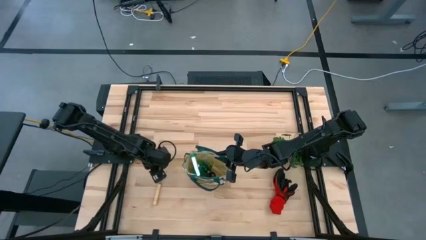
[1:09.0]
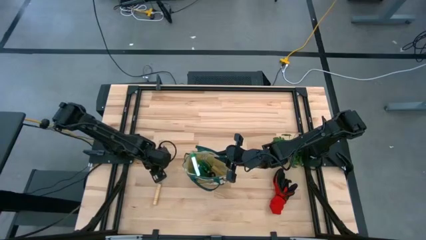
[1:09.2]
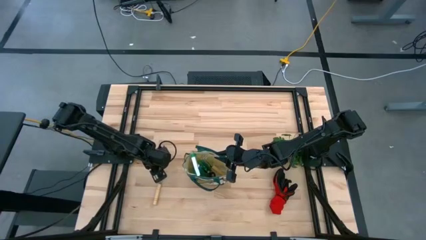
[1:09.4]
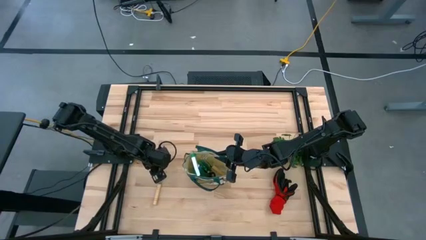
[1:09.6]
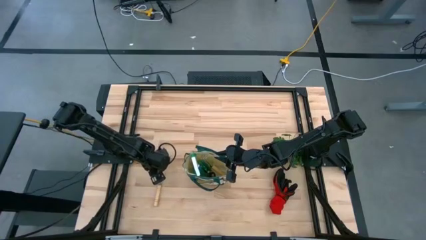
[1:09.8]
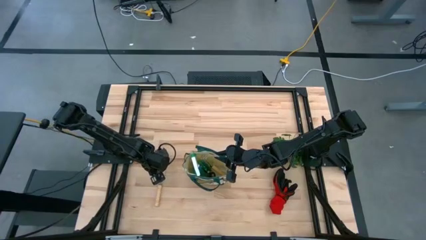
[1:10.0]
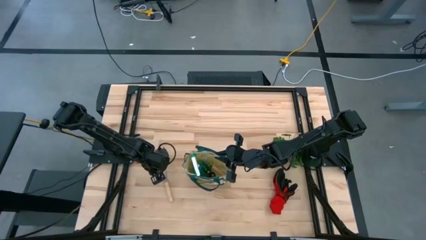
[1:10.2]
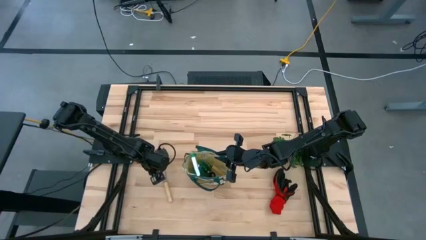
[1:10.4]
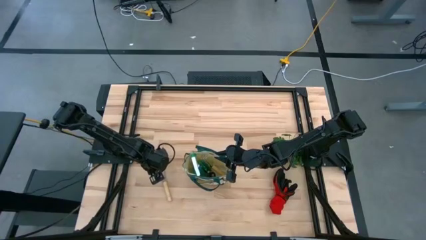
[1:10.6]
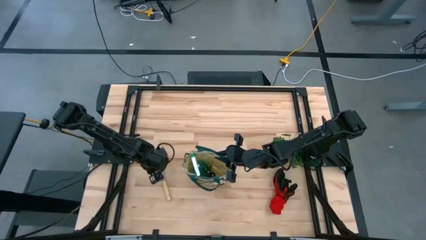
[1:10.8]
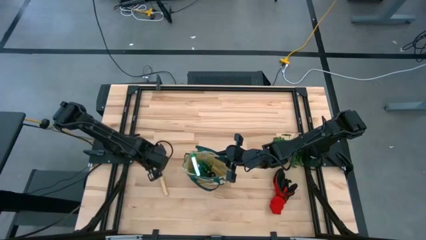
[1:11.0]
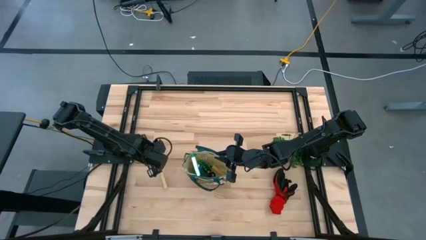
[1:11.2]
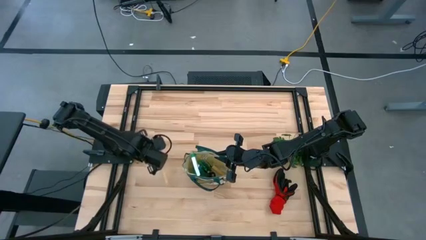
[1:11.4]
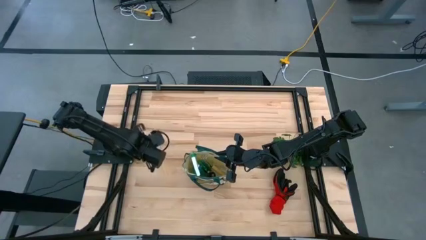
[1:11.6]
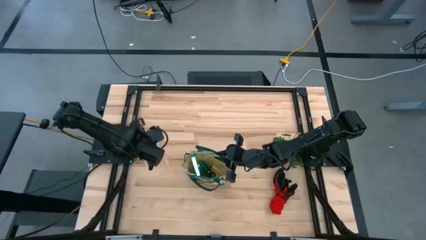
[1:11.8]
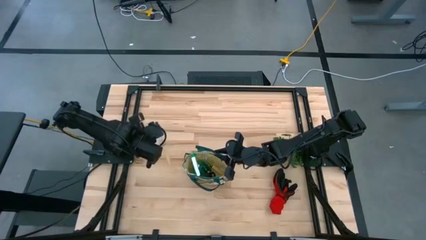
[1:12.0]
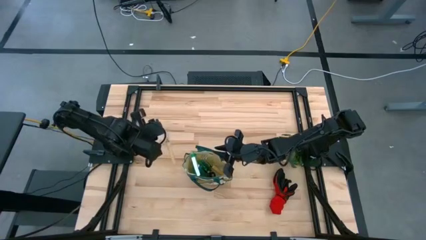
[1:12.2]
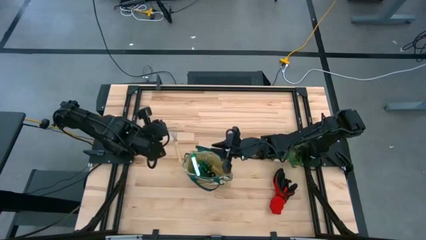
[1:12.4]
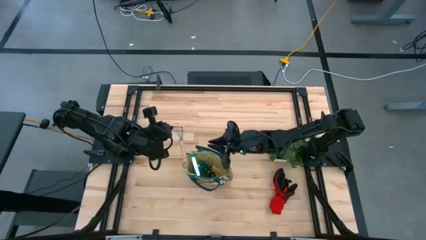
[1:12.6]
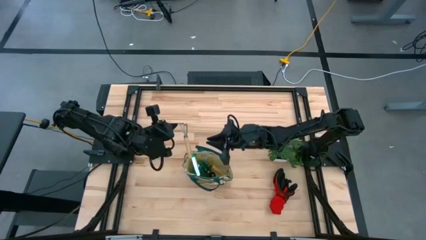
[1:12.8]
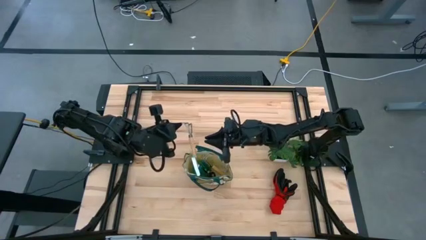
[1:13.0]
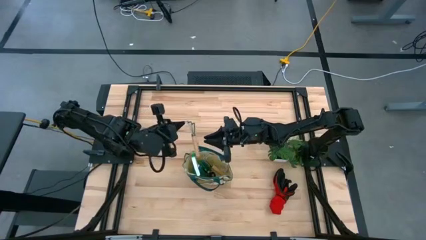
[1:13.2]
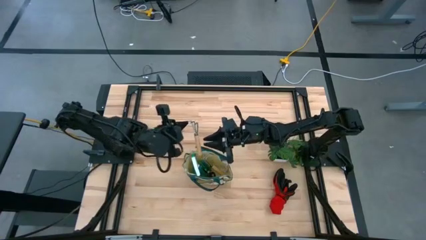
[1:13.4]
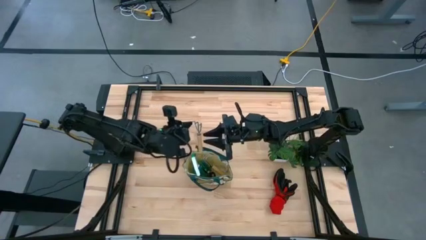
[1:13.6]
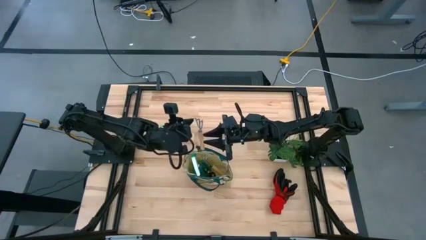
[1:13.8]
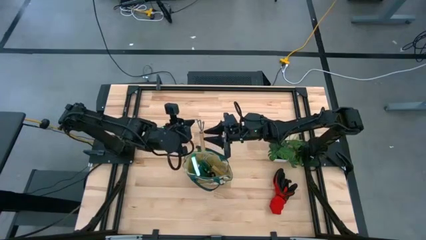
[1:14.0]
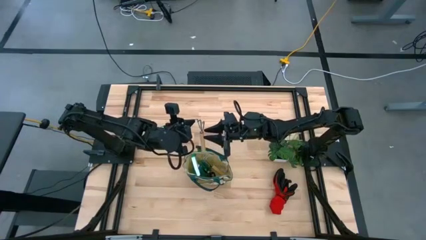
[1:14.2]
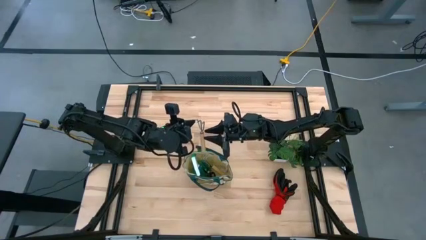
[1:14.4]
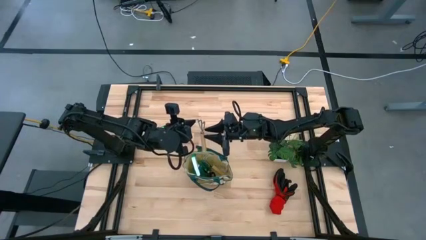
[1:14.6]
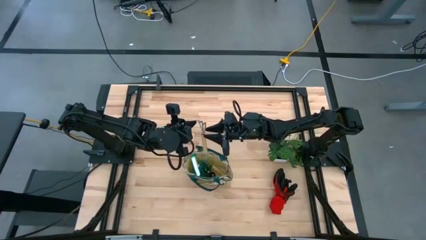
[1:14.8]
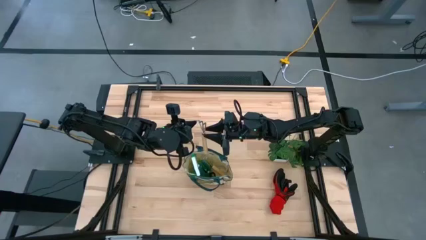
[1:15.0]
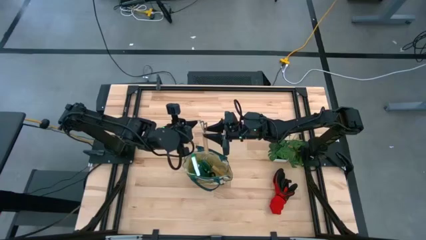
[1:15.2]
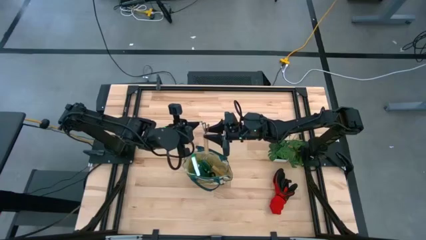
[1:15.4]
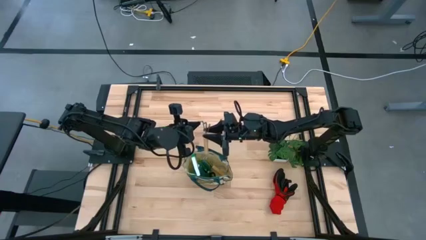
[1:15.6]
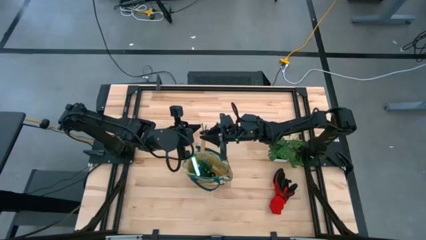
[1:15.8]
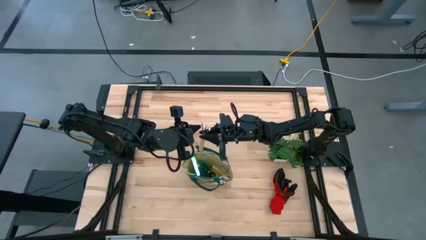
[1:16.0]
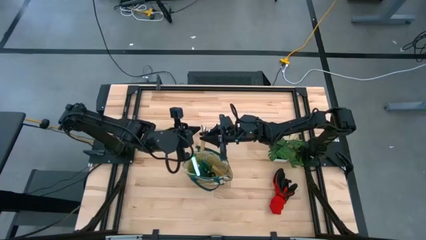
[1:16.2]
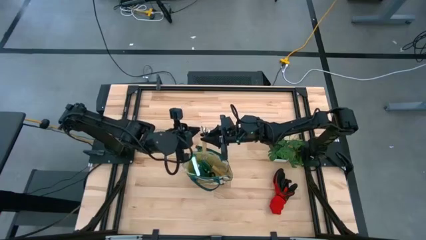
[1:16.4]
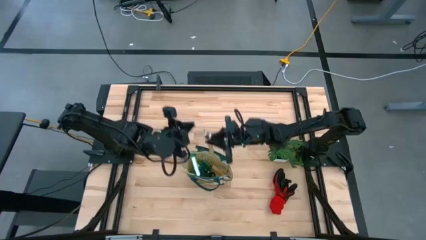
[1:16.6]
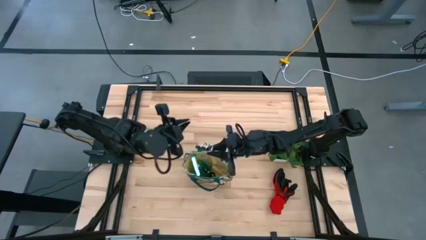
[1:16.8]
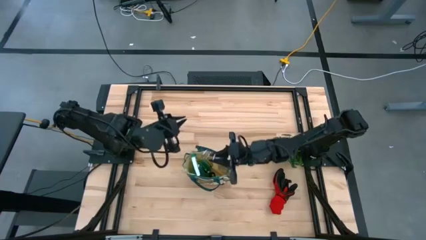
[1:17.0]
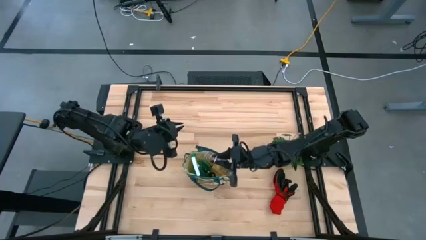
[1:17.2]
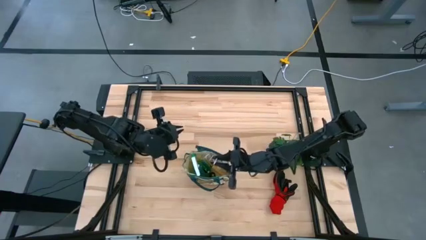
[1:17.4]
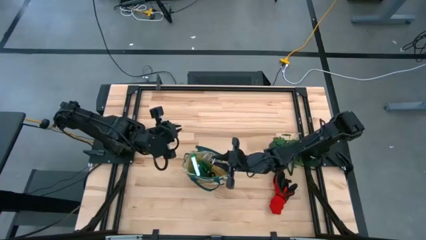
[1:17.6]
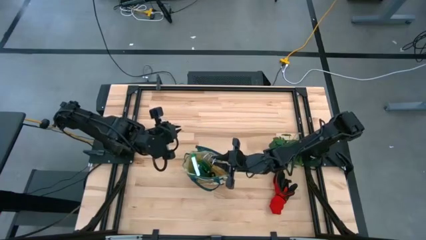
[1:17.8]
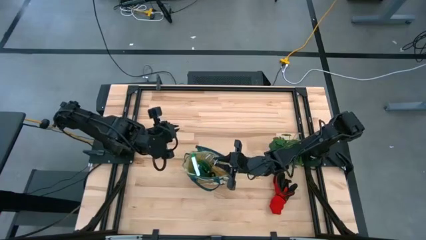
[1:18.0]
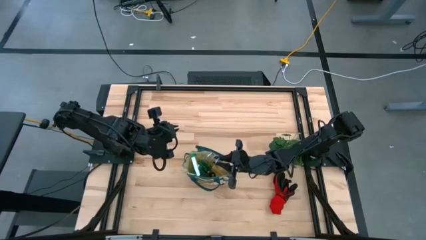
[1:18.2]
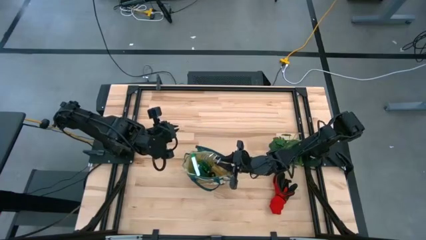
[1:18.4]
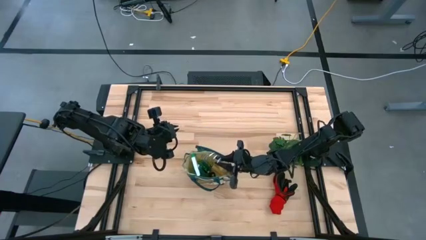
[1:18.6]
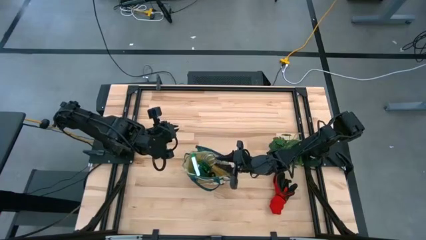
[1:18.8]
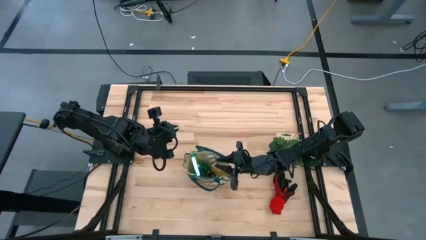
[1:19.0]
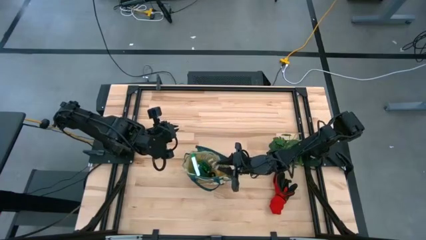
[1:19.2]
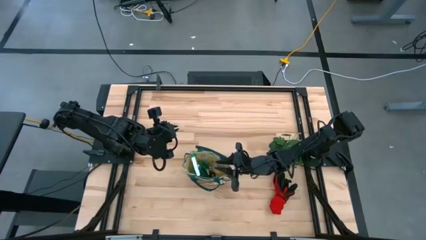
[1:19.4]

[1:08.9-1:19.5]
Task: Pick & Place Garden tools in Gardening bag
Put the brown hand rake into the gardening bag

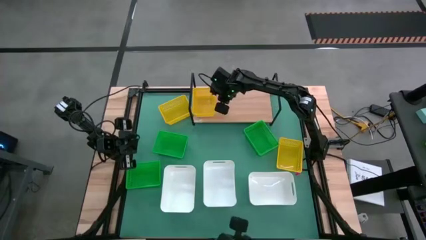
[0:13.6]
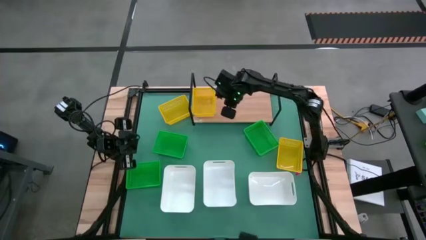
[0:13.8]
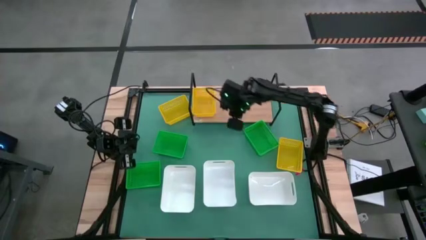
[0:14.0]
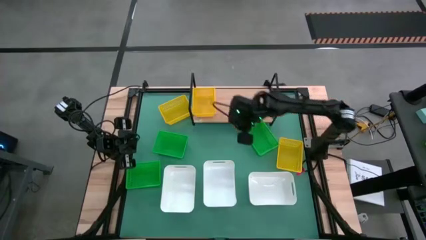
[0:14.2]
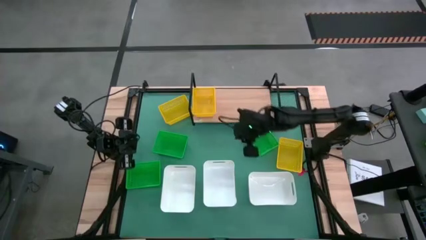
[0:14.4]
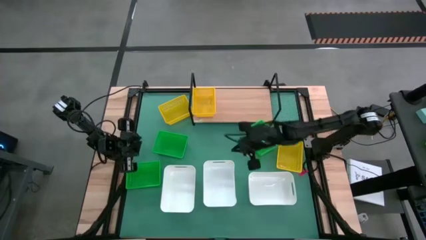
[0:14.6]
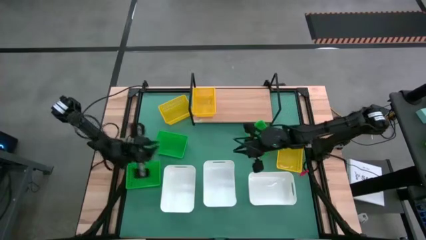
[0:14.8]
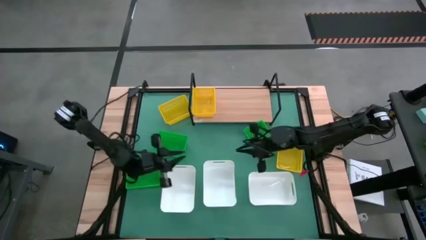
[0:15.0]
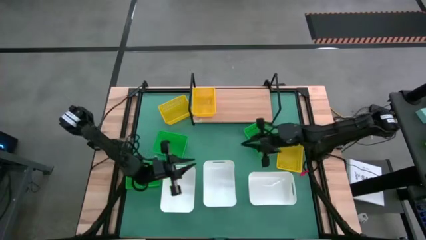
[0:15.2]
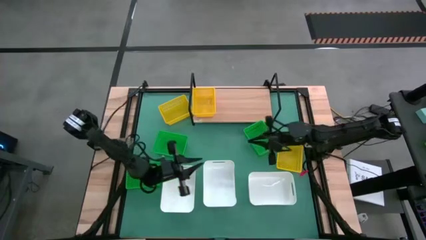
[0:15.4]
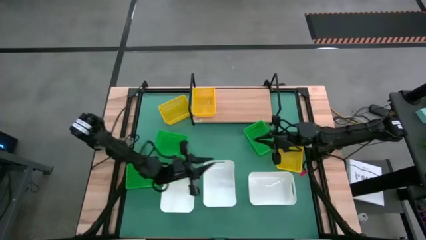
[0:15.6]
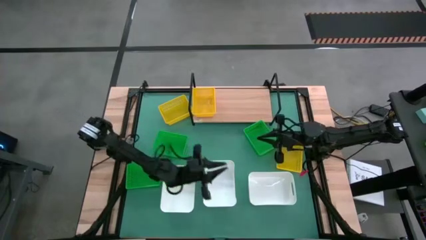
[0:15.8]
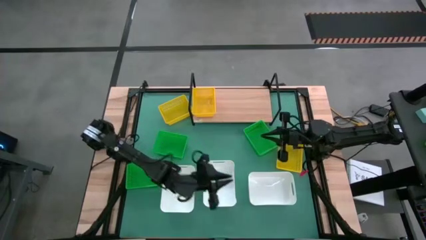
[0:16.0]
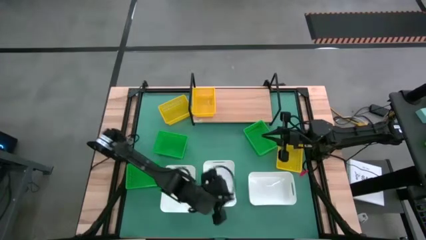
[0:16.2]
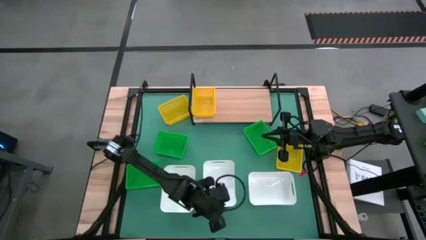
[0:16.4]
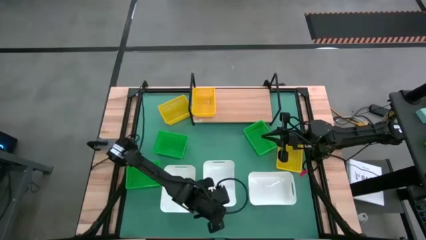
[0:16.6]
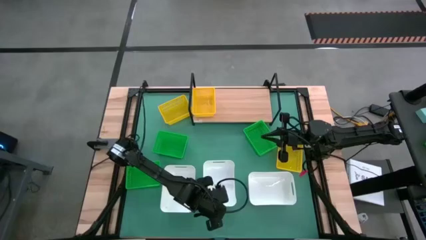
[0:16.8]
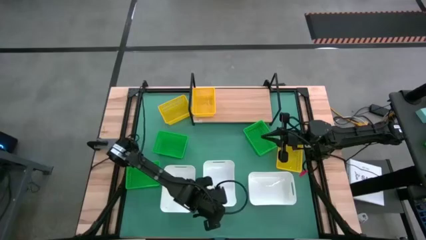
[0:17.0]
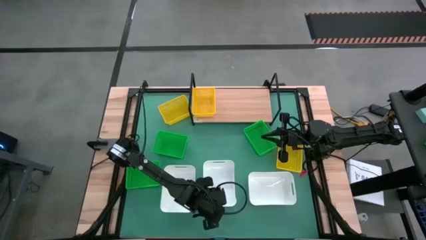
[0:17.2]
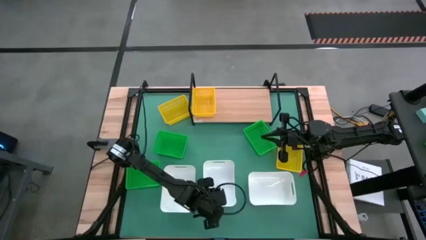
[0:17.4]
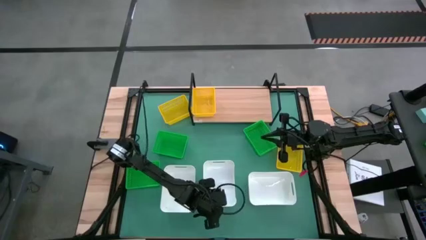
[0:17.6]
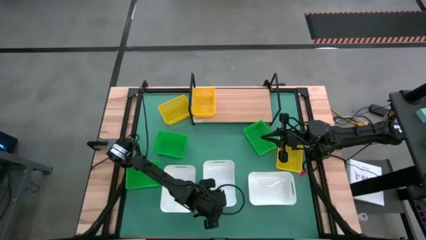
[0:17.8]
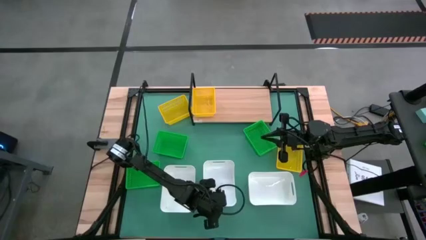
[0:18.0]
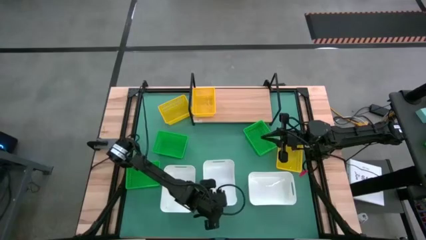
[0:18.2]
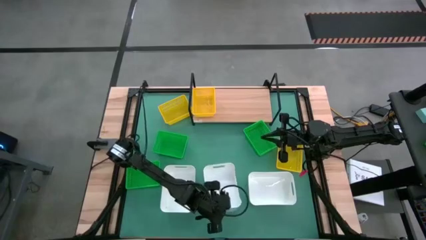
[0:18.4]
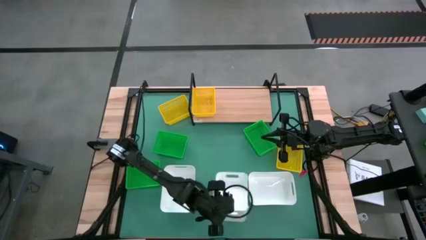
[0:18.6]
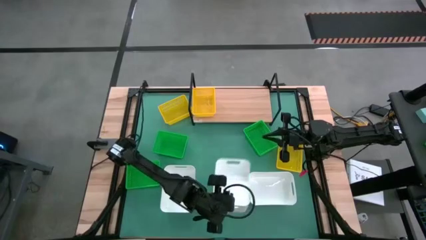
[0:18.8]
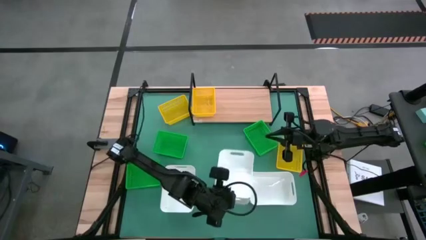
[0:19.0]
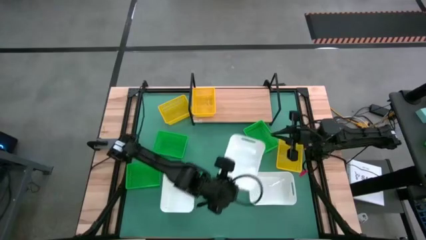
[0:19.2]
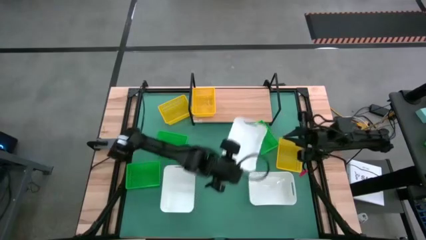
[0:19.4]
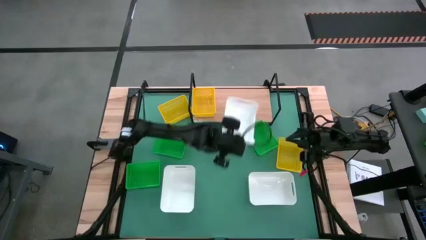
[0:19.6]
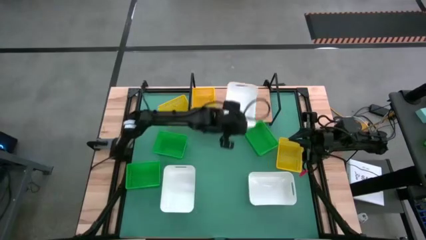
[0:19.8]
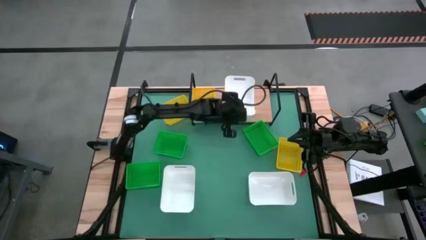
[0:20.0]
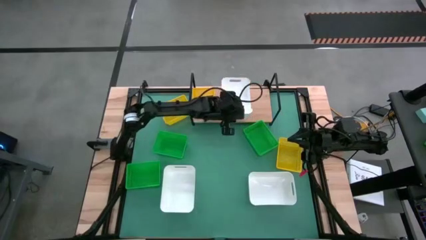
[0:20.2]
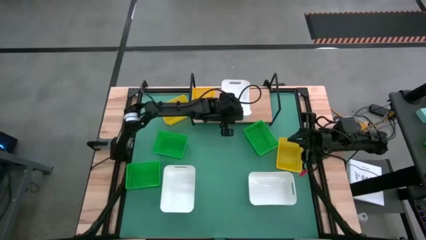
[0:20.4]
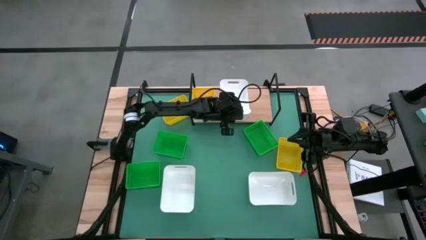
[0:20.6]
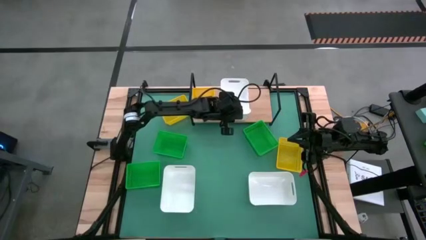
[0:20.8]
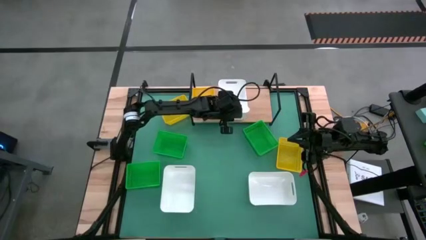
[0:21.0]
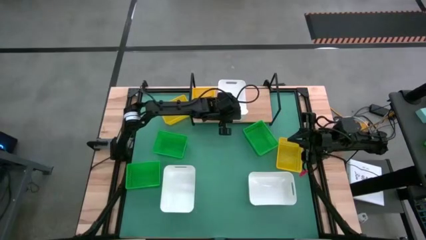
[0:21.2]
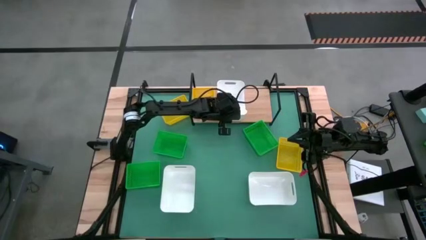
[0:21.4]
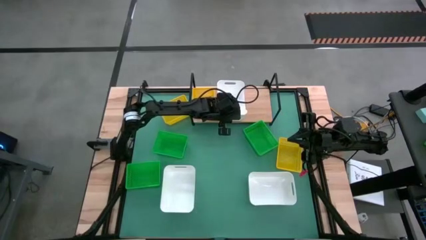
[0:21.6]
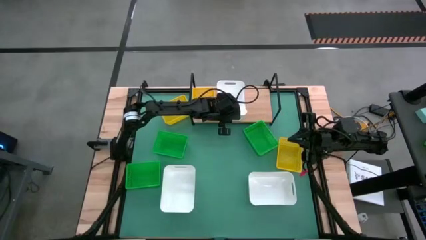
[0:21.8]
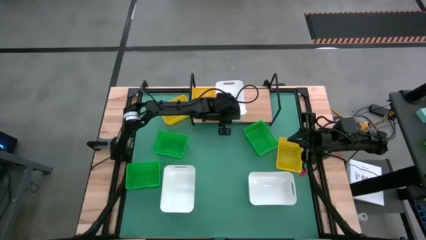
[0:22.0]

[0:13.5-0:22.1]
Task: Stack baskets on shelf by color
Put the middle white bin on the shelf
